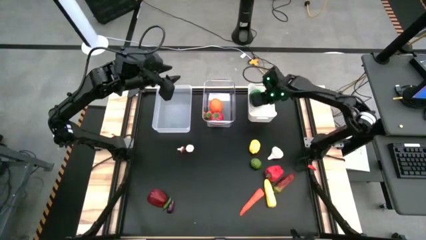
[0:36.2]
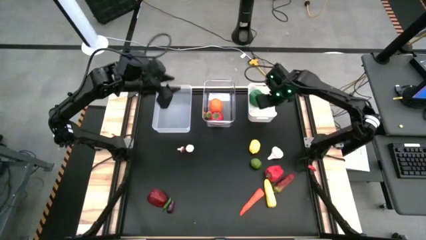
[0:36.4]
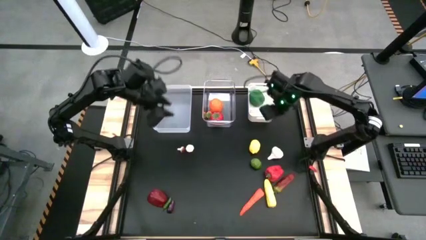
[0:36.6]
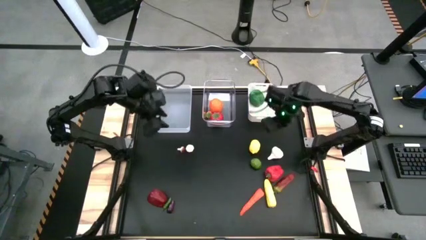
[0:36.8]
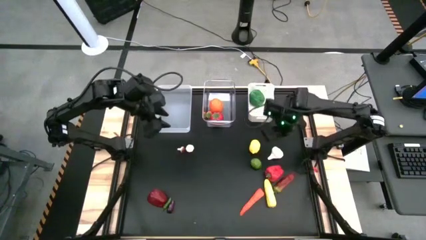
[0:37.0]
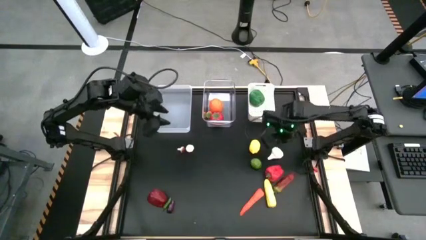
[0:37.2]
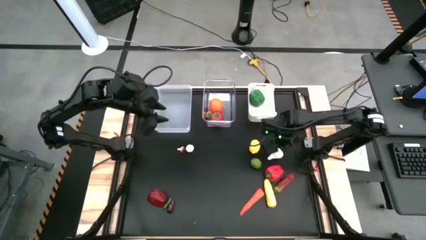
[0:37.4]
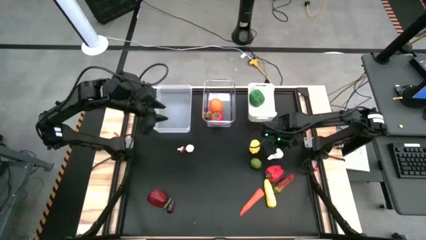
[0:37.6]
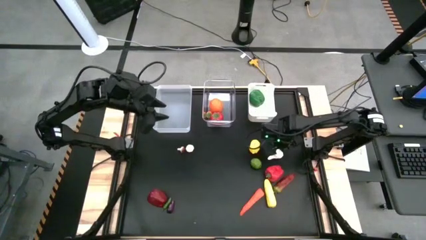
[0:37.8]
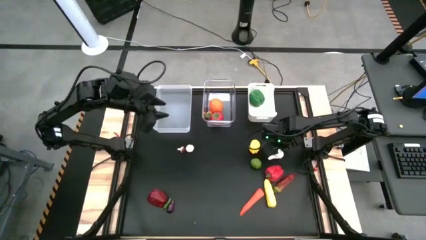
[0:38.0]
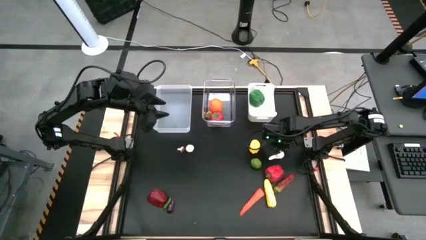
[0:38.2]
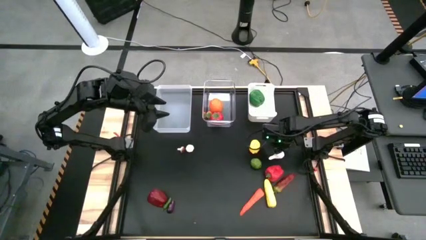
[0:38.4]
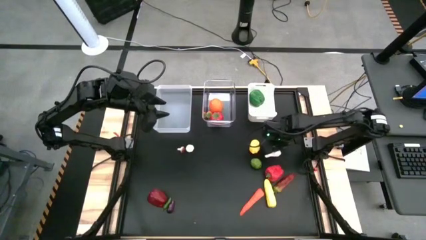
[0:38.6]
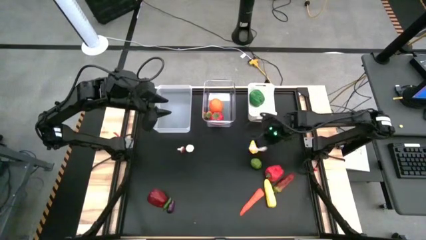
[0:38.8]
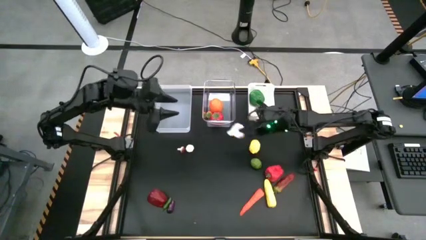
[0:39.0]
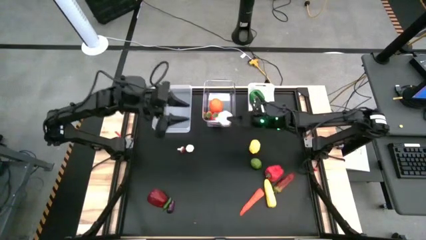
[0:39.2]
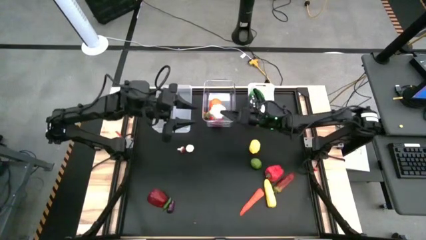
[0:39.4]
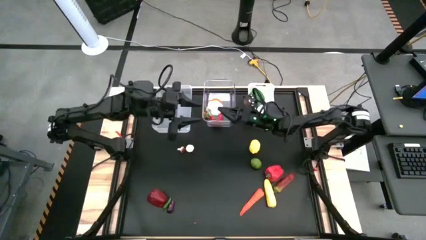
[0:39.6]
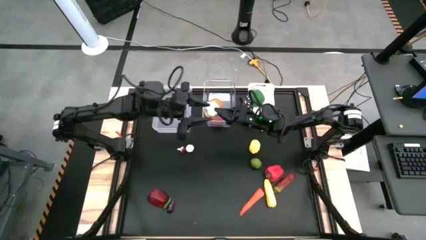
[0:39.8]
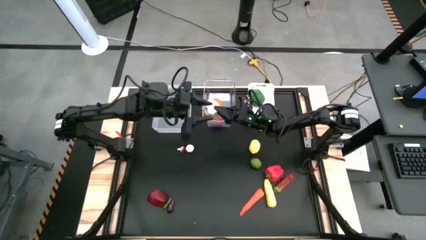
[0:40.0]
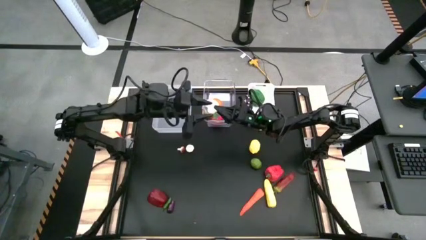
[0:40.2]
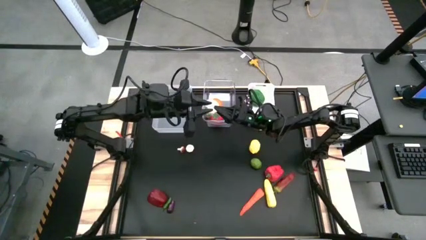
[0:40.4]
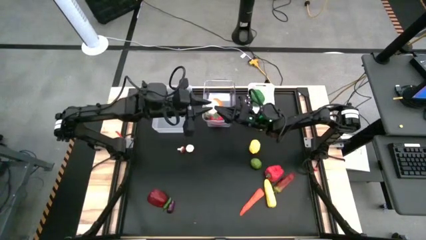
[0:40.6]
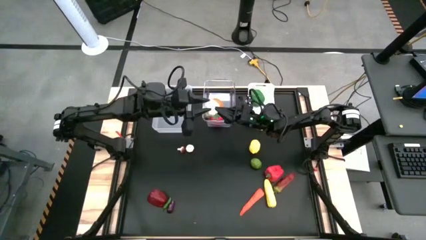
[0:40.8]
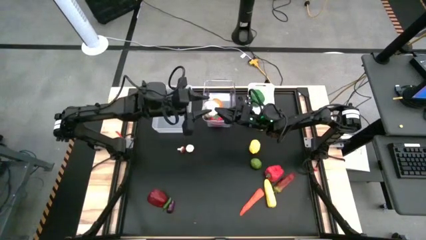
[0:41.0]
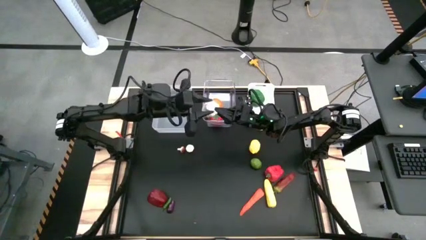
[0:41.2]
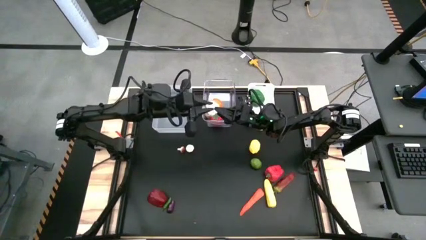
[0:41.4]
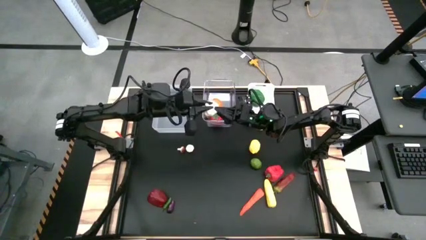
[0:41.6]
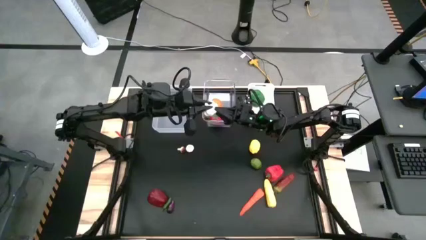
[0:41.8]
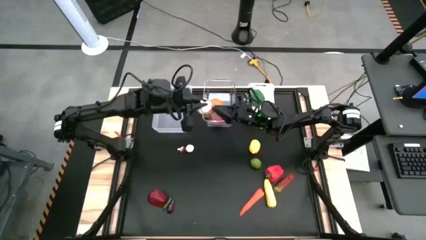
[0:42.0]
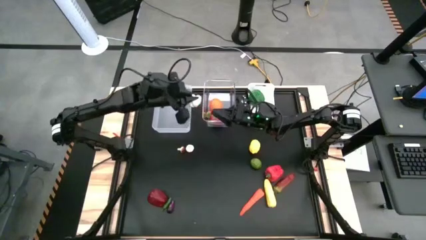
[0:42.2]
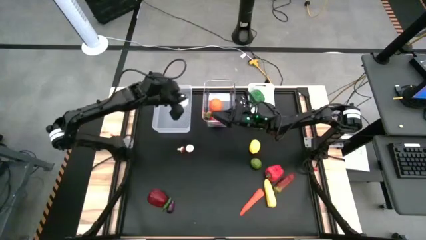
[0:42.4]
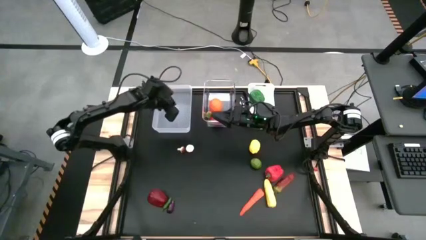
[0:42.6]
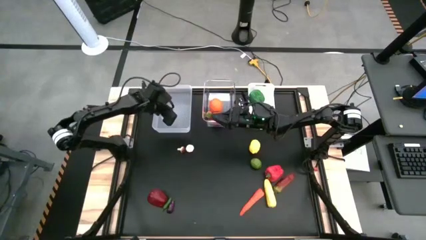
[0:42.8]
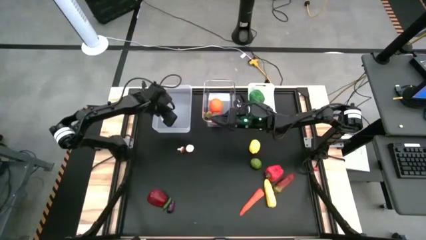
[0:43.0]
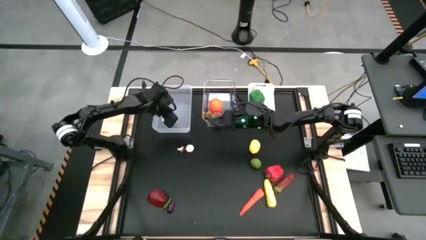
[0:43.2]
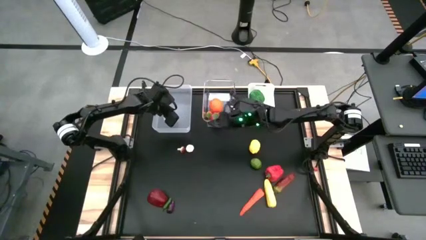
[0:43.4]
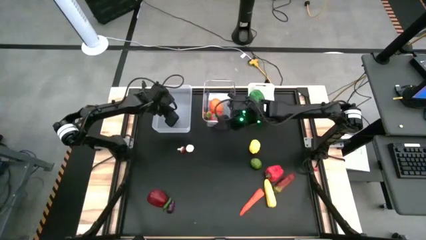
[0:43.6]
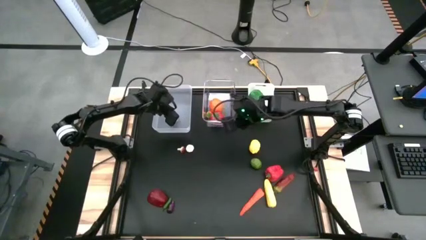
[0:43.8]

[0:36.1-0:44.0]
Task: Sort produce into baskets
Put the big white garlic into the left transparent bin

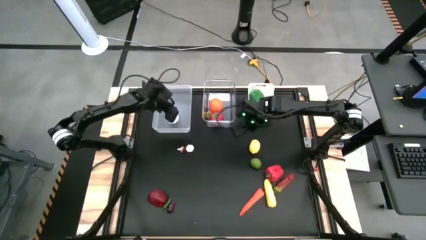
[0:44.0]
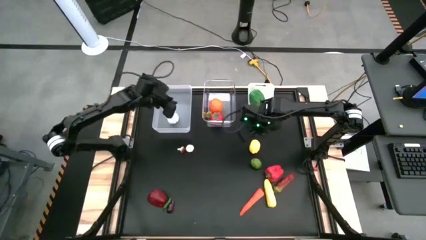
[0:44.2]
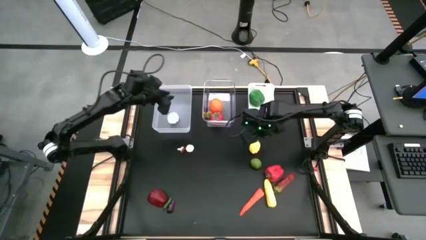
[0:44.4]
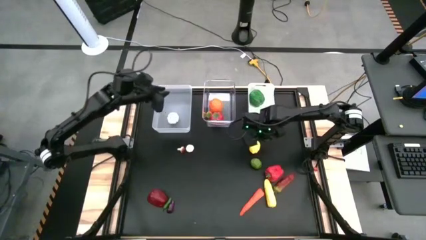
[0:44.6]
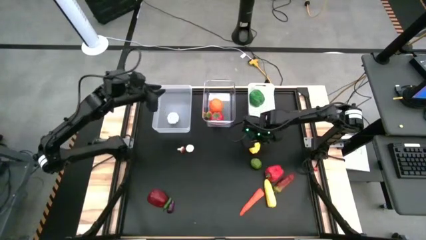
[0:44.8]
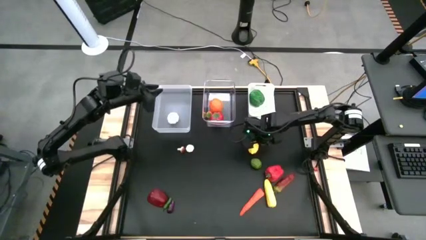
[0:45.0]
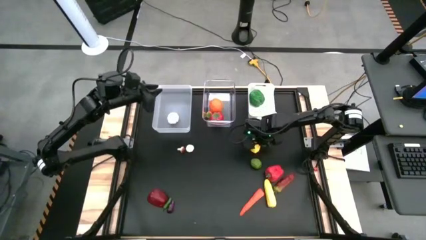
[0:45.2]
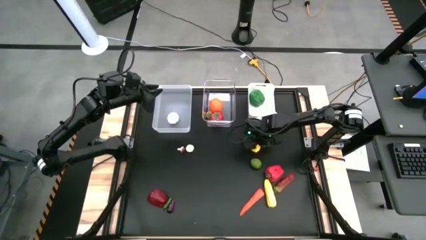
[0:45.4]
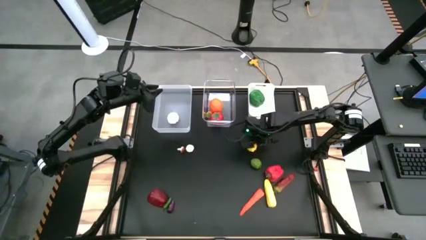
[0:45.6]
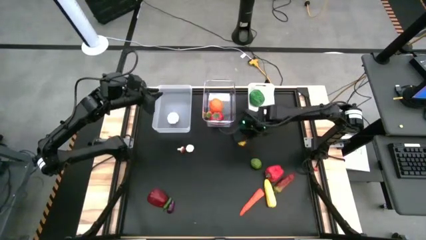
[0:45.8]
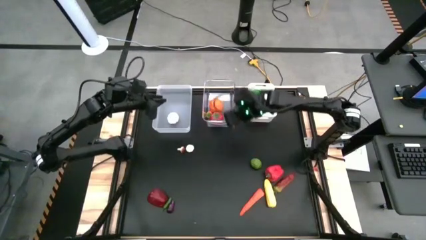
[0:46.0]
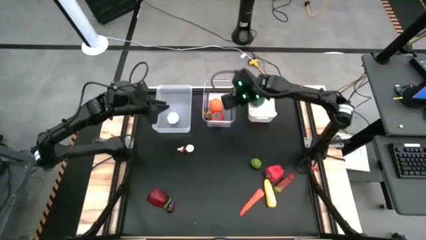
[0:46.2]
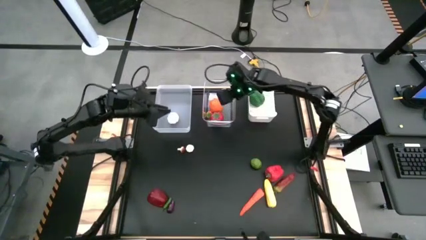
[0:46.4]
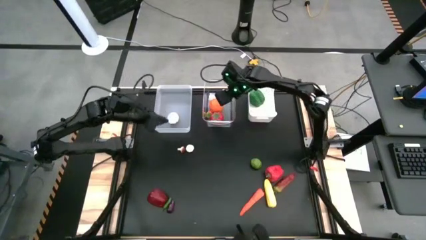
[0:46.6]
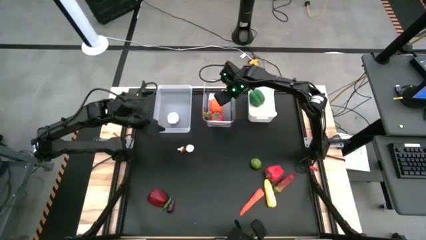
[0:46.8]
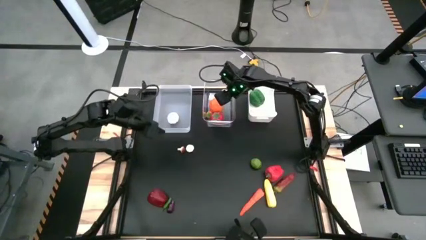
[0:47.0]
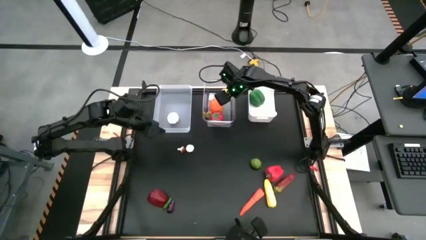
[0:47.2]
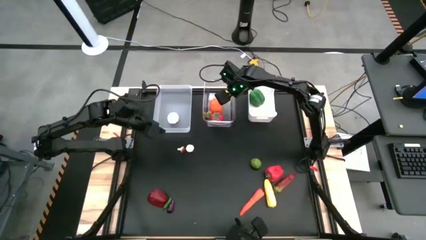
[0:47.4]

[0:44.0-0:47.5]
Put the yellow lemon into the right transparent bin

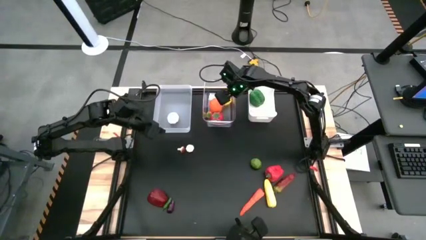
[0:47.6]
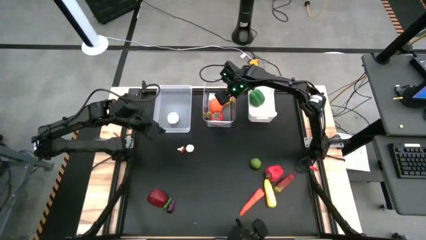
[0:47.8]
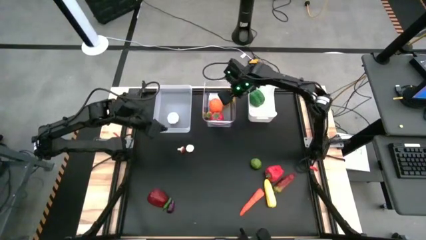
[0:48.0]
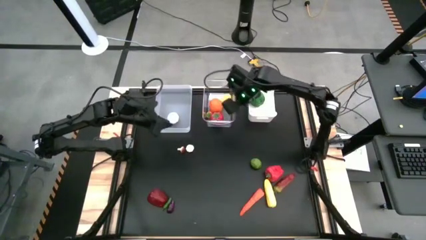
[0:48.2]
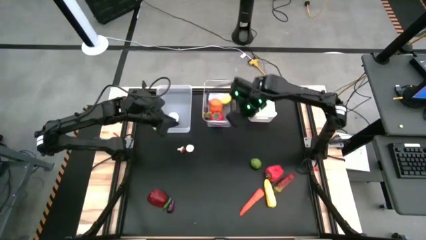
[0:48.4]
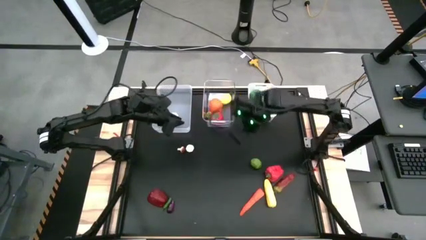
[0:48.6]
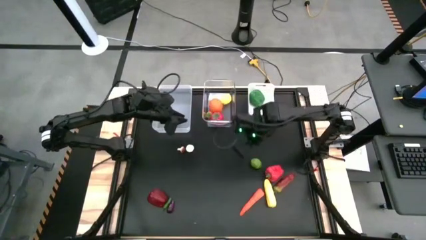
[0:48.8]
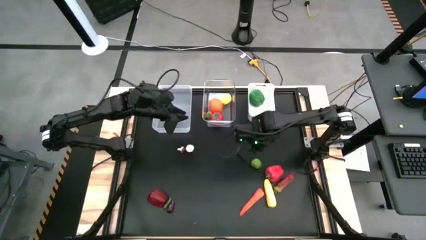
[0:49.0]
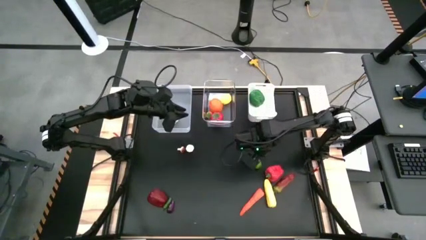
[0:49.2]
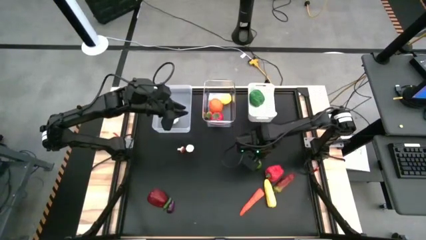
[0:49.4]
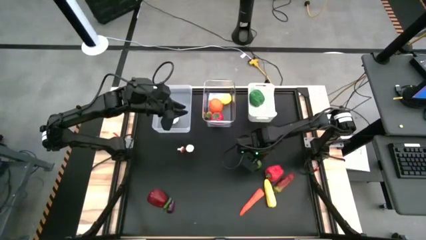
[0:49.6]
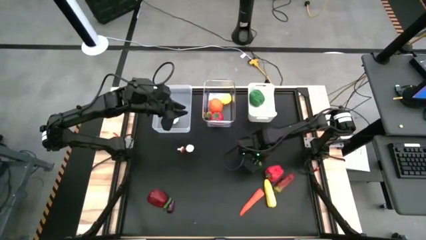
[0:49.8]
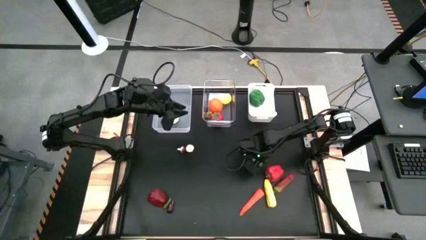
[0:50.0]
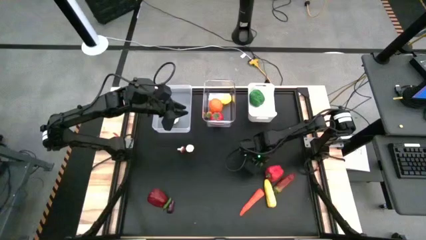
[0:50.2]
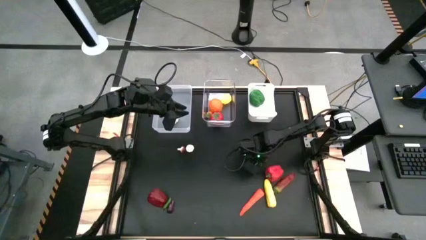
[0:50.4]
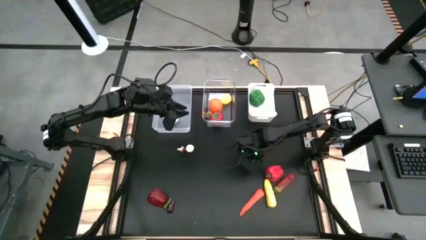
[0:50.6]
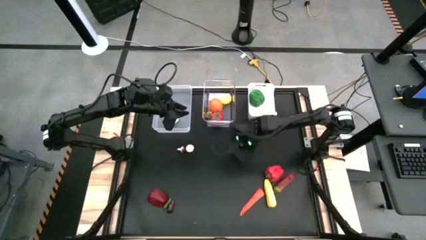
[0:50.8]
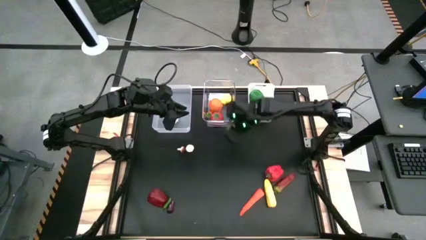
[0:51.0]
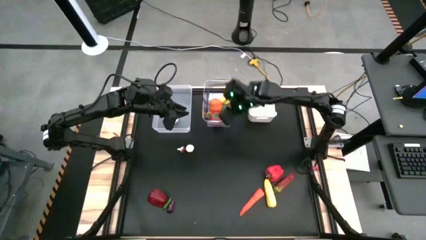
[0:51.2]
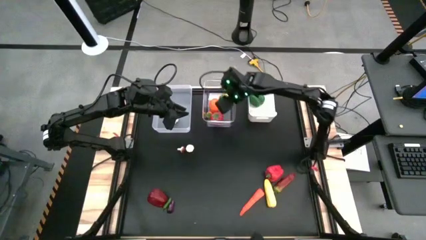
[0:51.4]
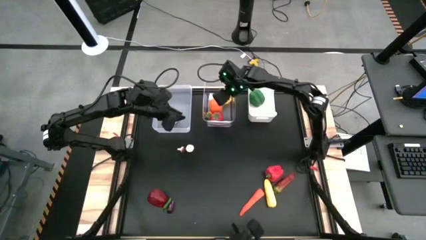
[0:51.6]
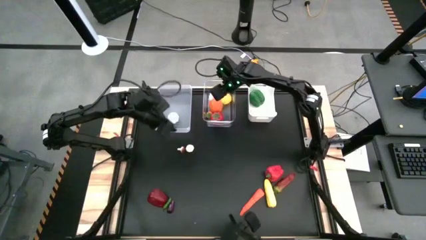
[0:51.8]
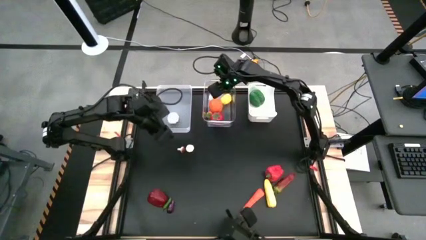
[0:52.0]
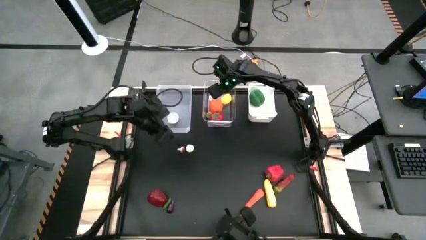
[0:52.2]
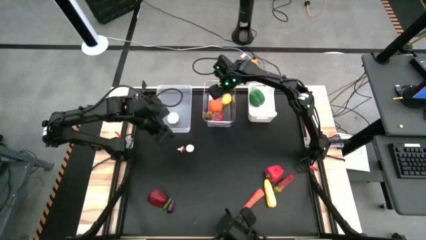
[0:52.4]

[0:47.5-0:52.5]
Put the green lemon into the right transparent bin
